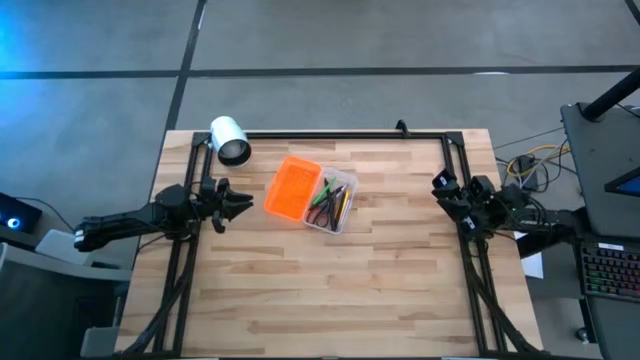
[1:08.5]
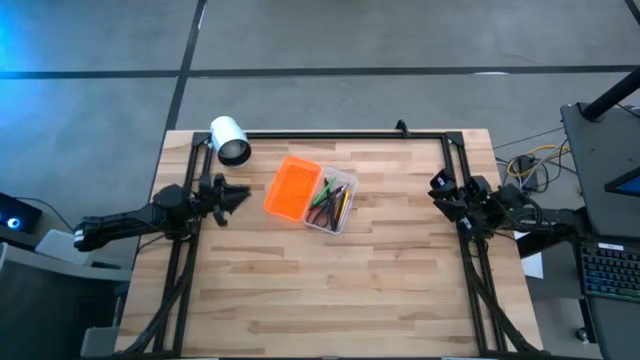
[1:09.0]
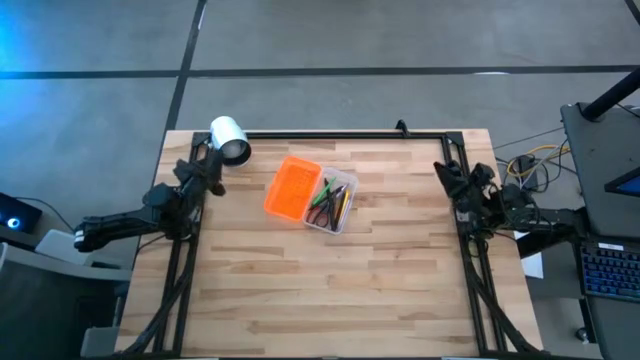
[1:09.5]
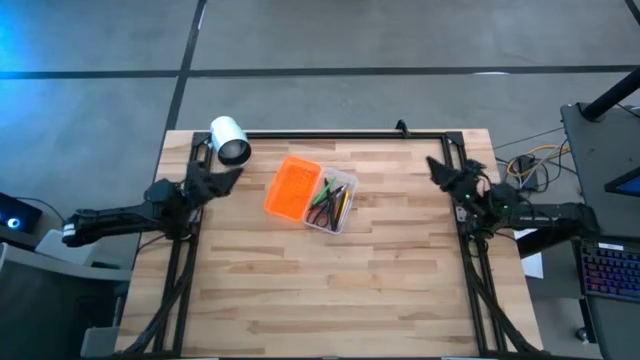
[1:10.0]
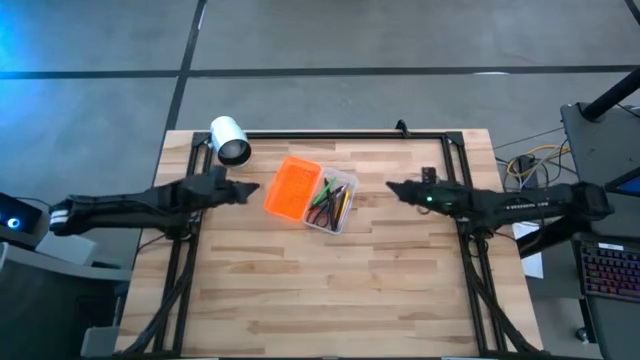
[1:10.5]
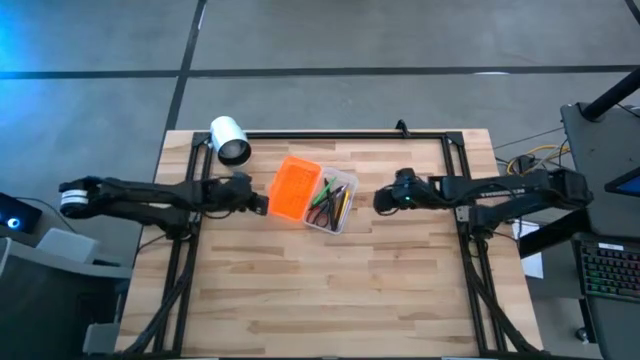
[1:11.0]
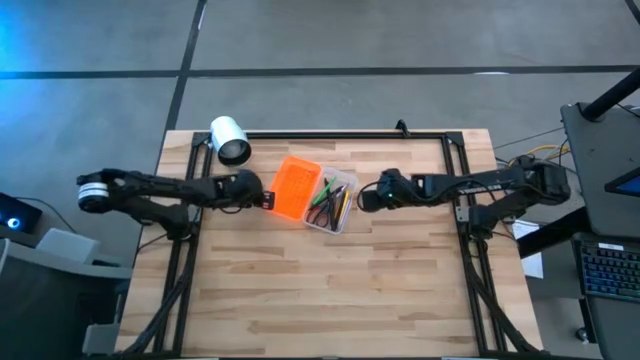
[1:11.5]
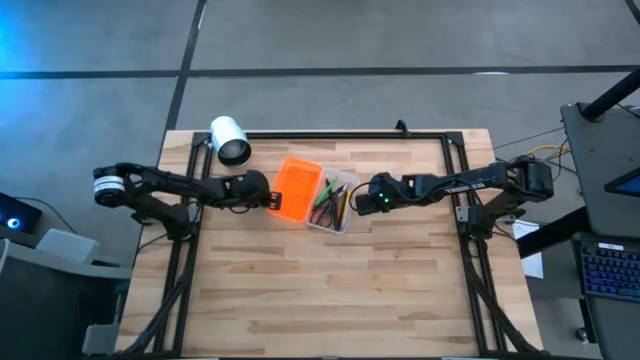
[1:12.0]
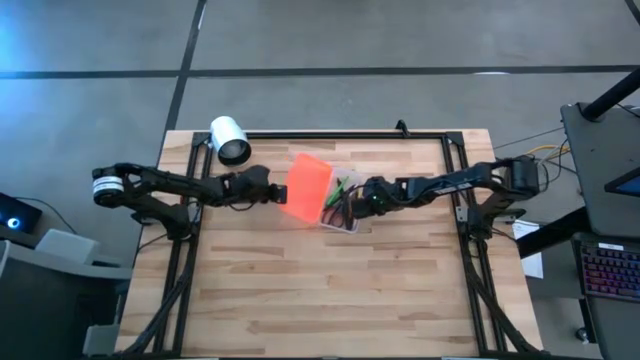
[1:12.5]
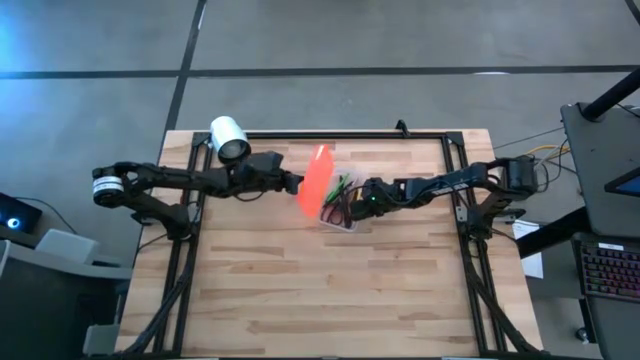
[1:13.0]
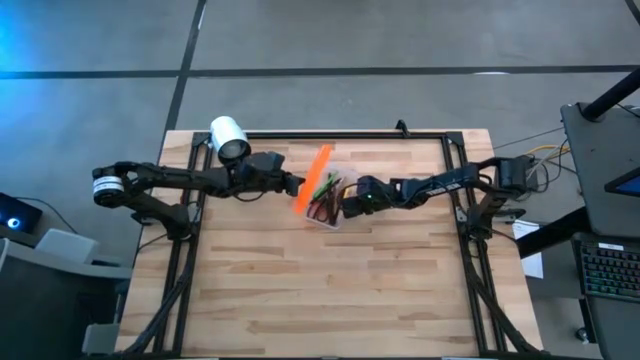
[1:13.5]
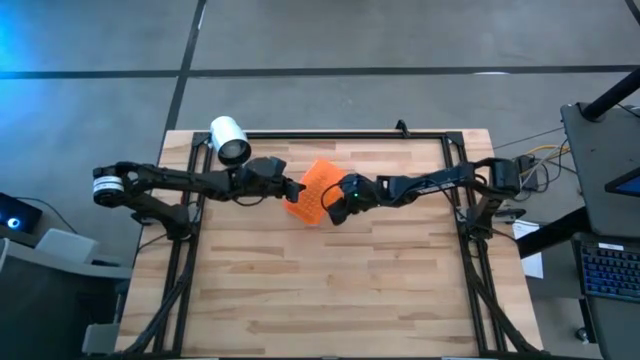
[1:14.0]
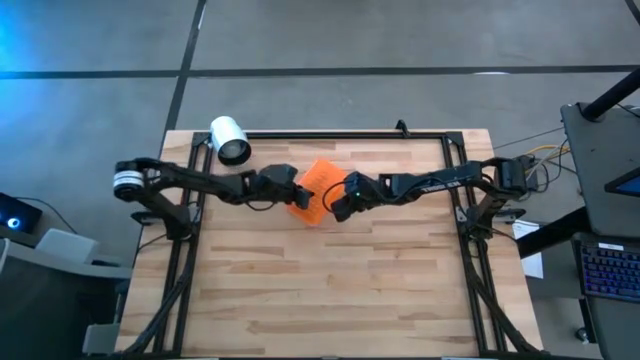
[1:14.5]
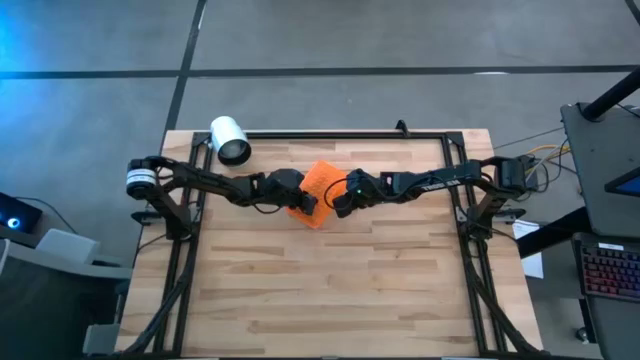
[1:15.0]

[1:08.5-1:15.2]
Task: Pick & place school supplies into a supply box
Close the orange supply box

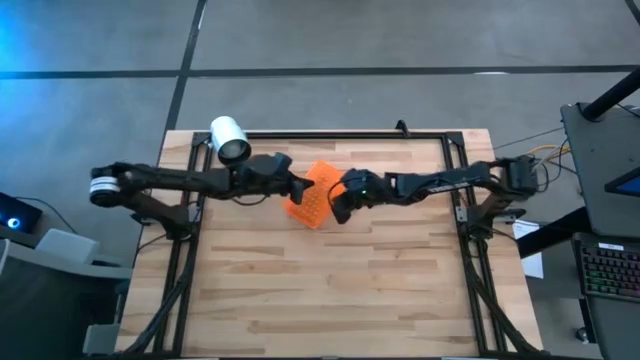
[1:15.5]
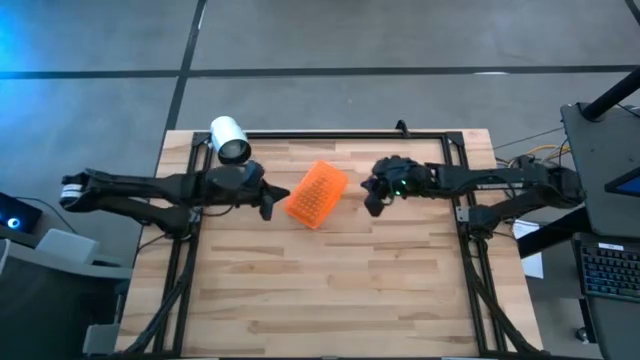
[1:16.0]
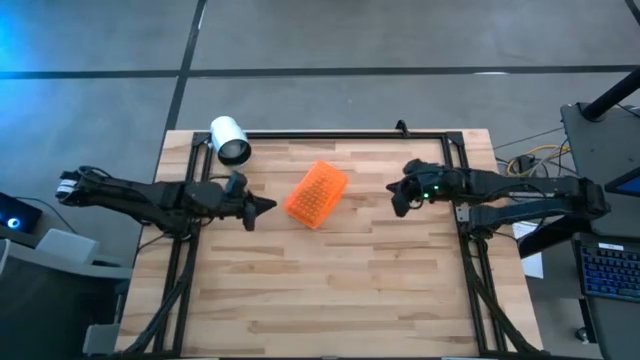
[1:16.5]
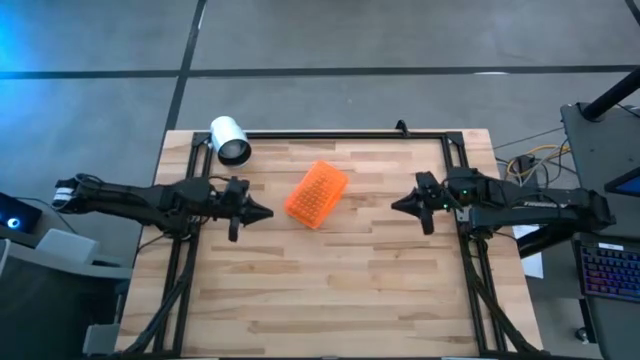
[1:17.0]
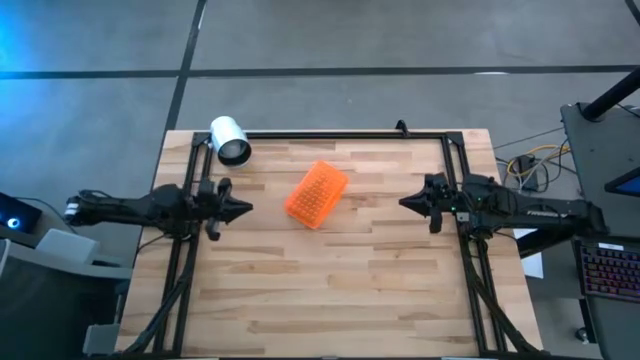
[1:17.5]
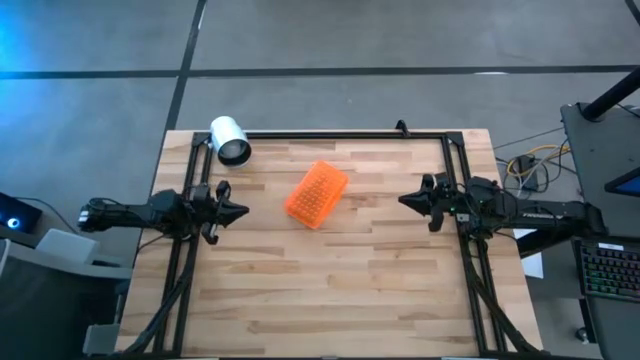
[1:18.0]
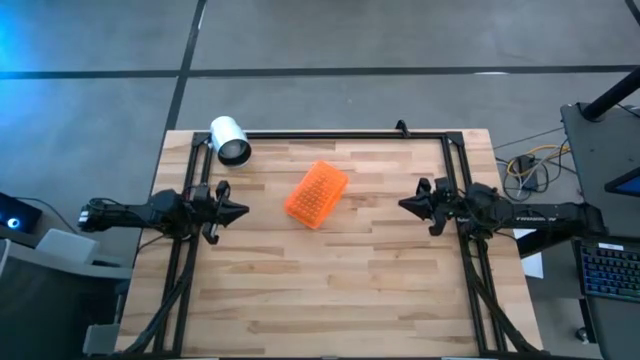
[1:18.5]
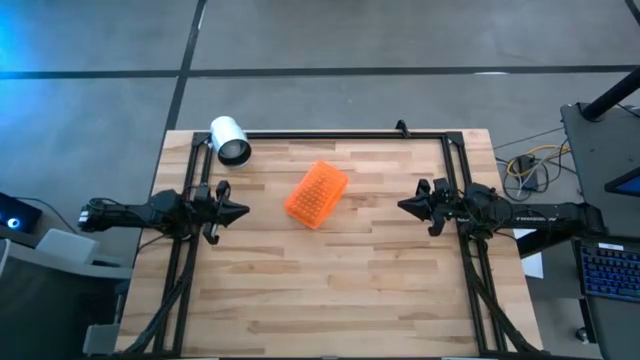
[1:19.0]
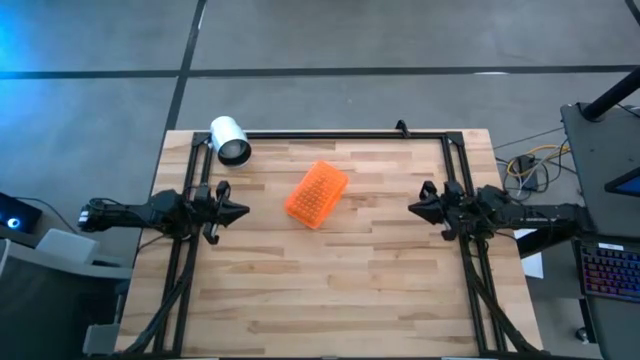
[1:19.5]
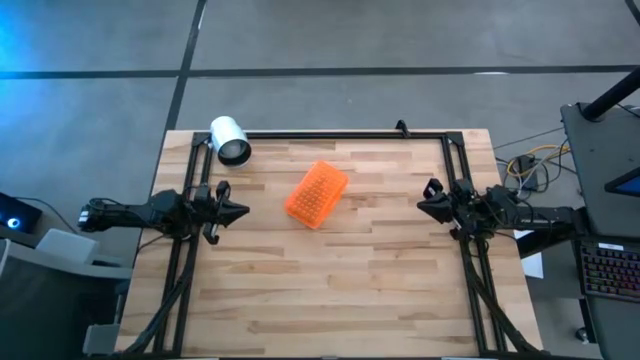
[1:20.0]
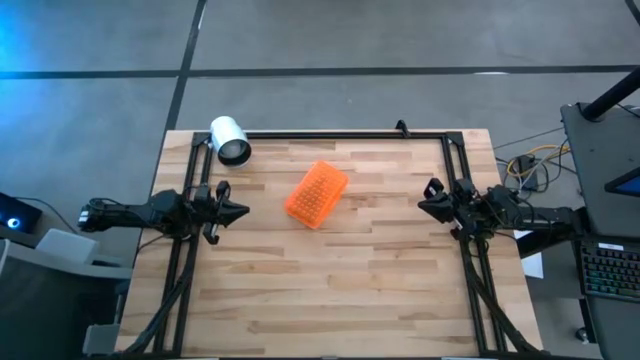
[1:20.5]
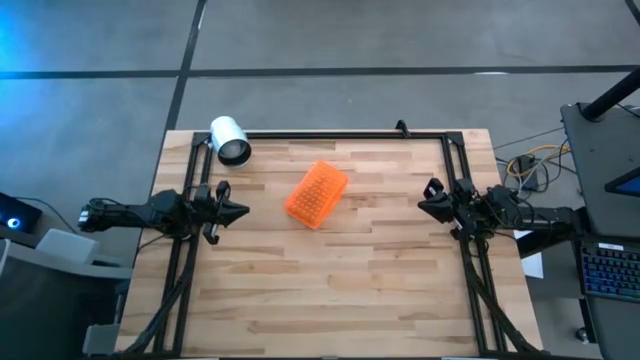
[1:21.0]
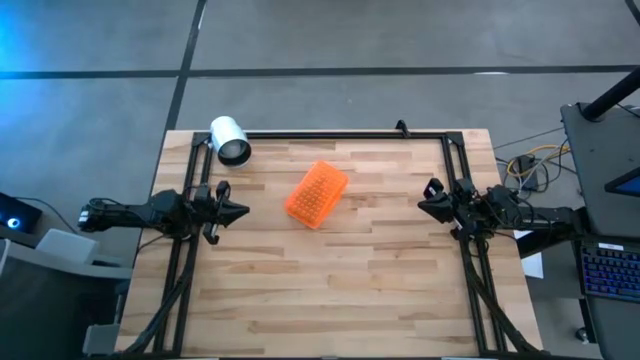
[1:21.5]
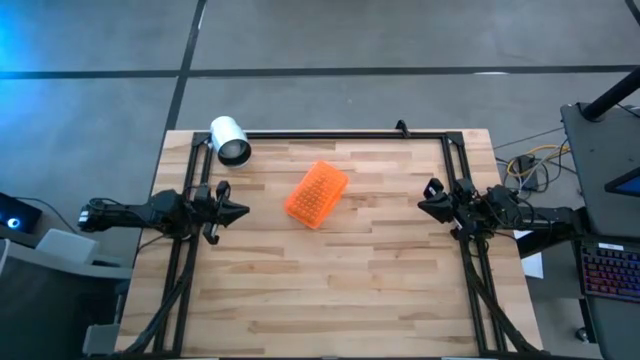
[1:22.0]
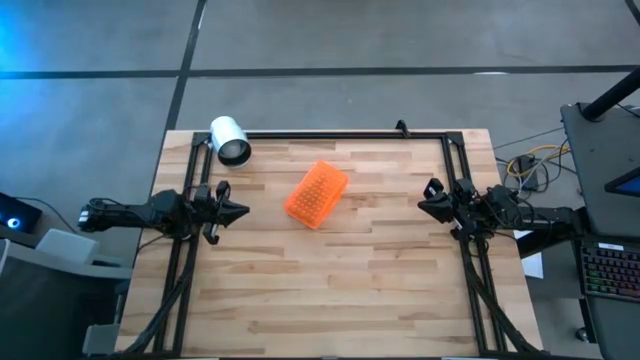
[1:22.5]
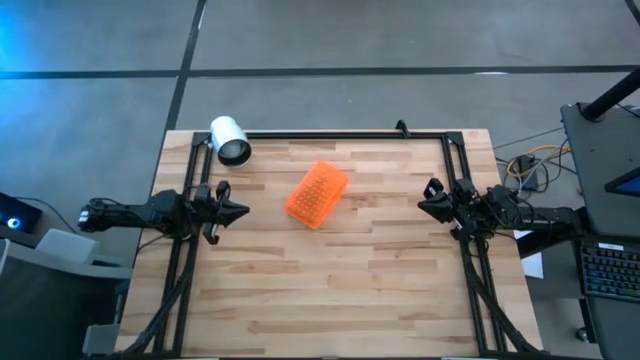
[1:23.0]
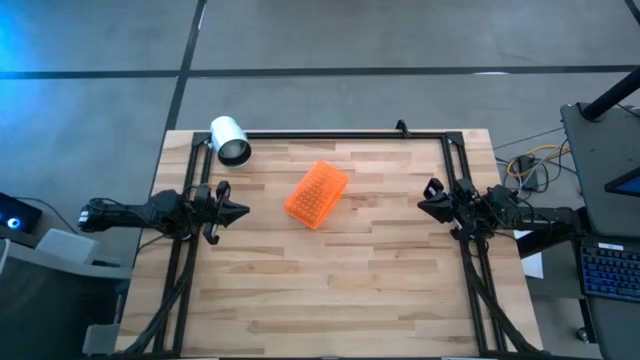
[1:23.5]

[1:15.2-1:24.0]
Return to Home Position

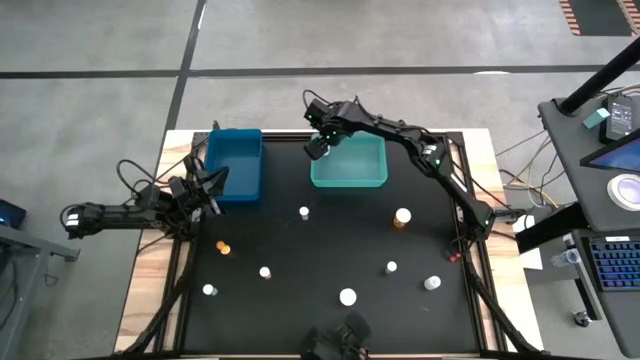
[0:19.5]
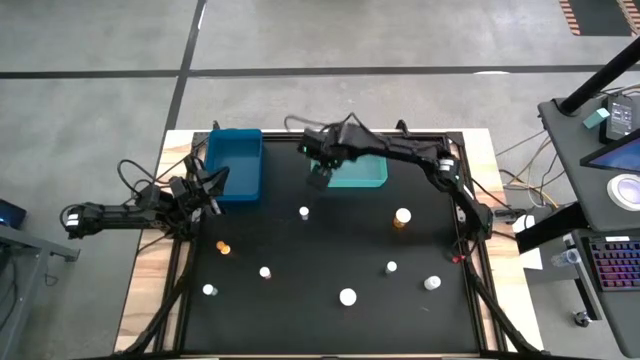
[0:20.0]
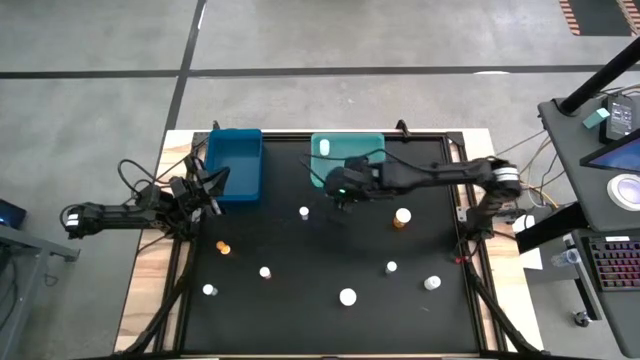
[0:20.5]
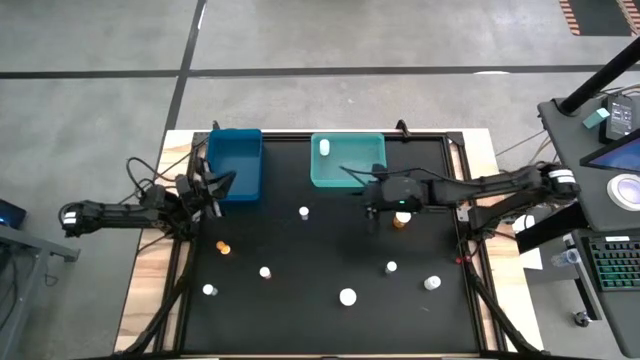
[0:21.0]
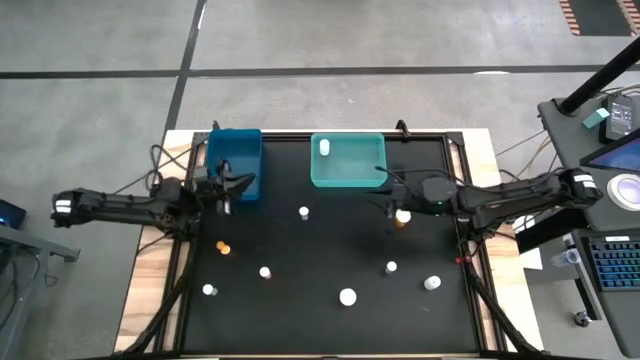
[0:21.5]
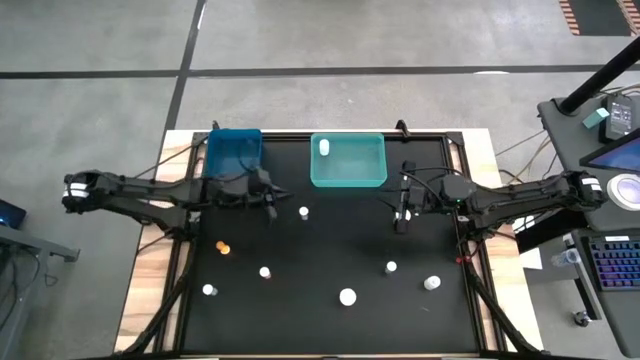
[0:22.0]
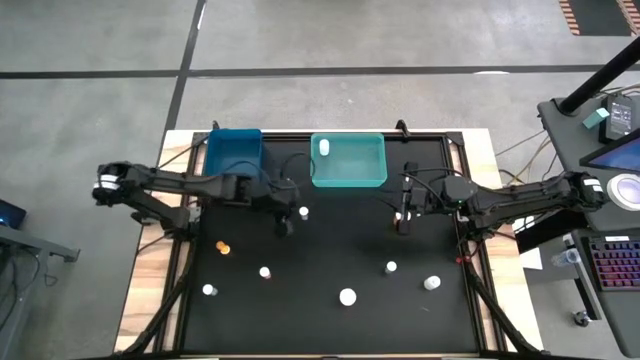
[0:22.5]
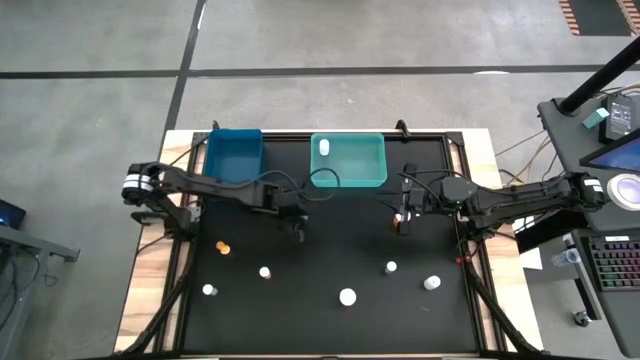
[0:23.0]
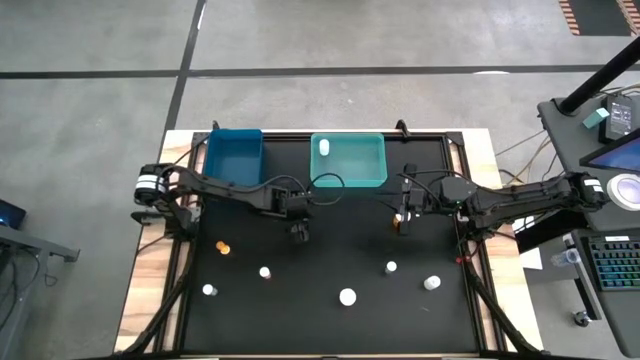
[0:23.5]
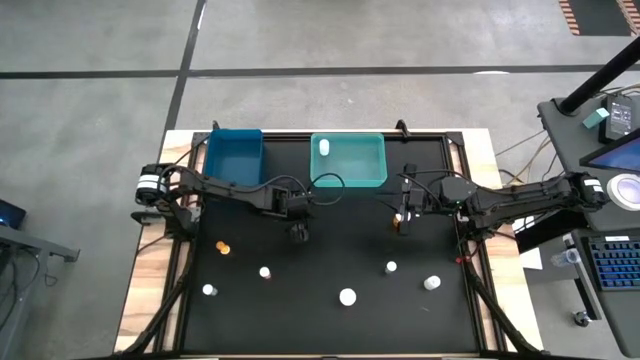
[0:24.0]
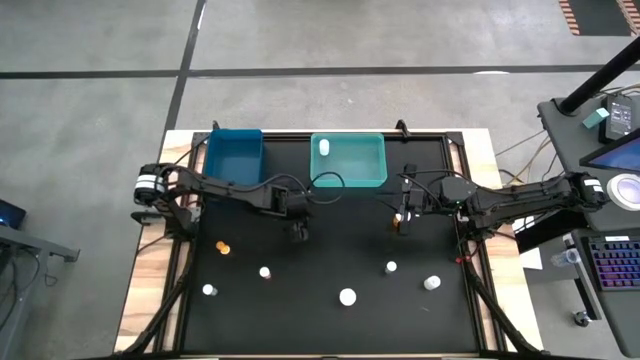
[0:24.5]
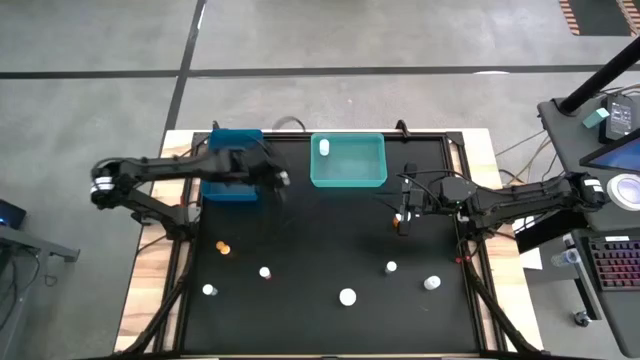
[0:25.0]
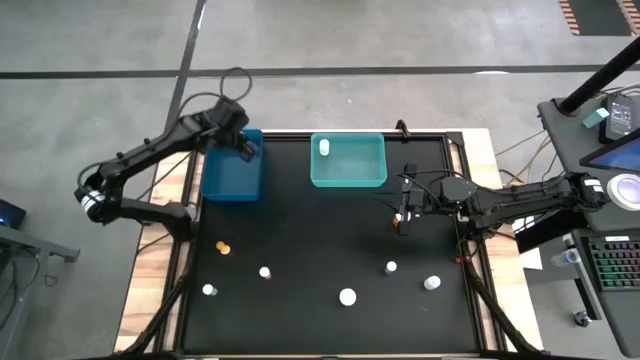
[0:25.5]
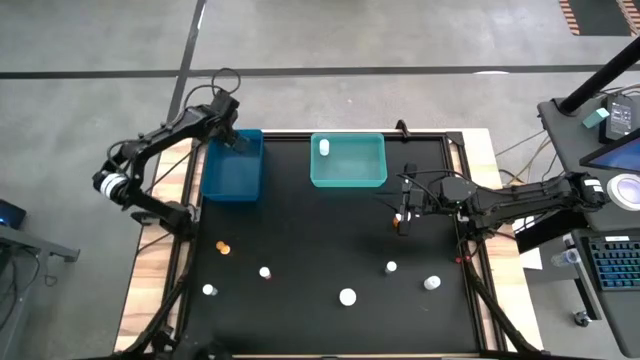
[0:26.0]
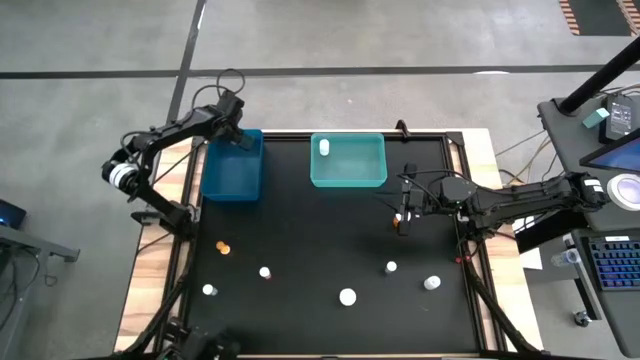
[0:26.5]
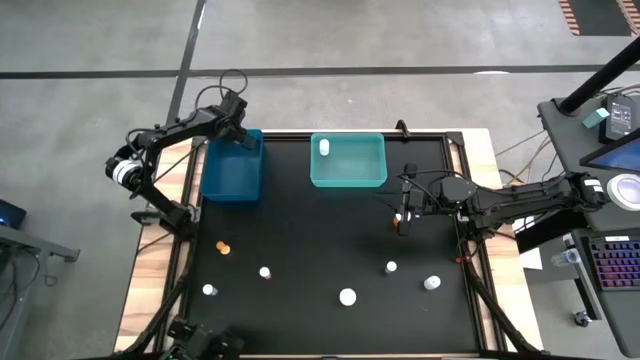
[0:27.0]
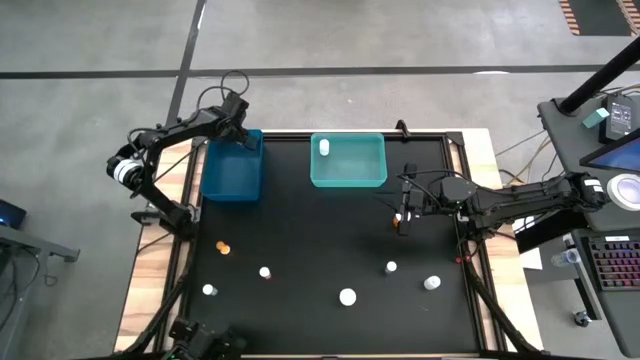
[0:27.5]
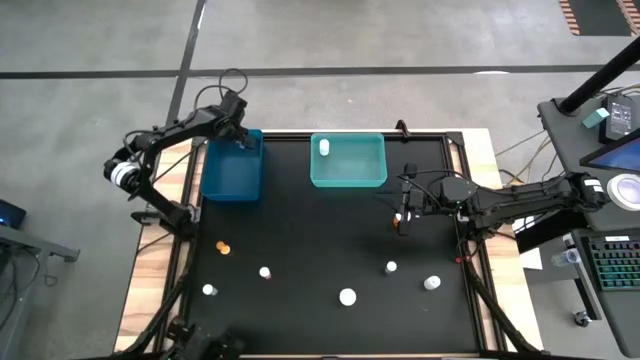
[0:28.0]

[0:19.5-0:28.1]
Task: Pick and place medicine bottles into bin by pill shape (circle, oval)
Put the top blue capsule bottle into the blue bin
